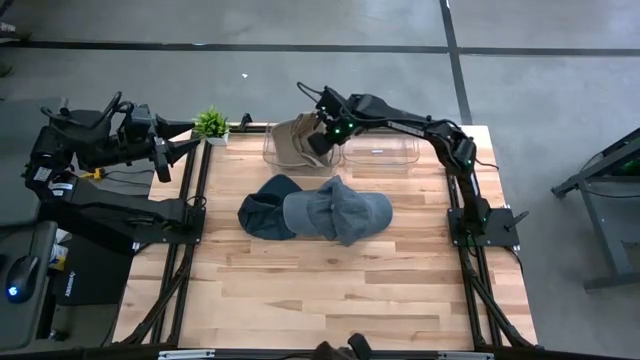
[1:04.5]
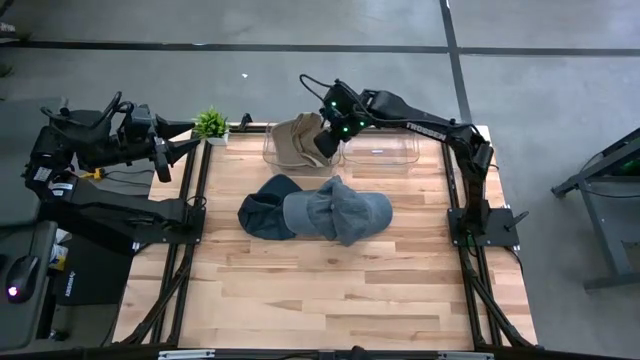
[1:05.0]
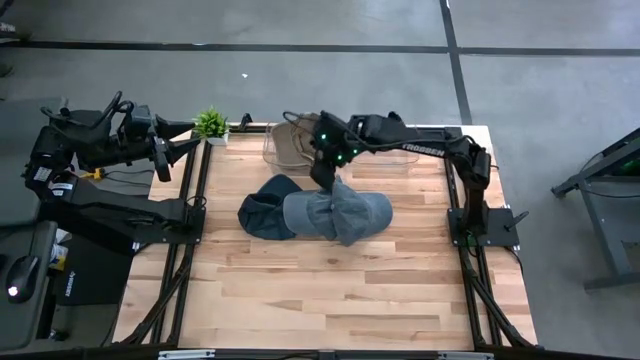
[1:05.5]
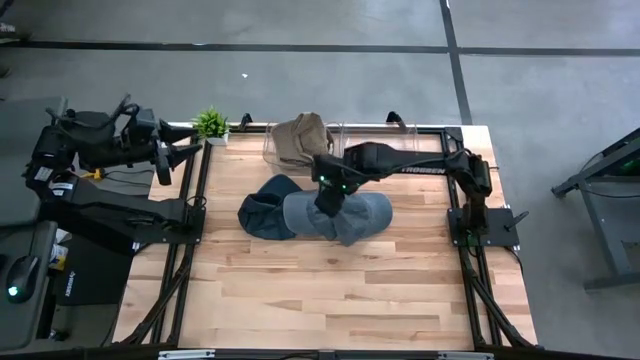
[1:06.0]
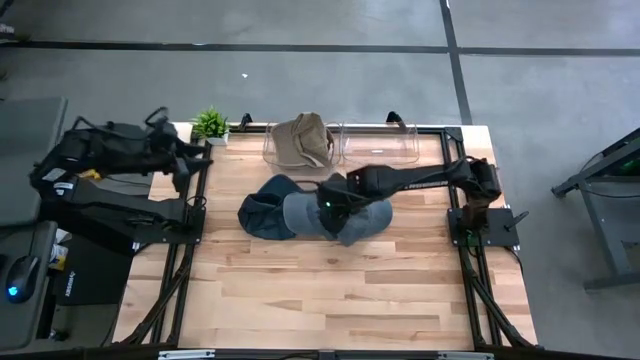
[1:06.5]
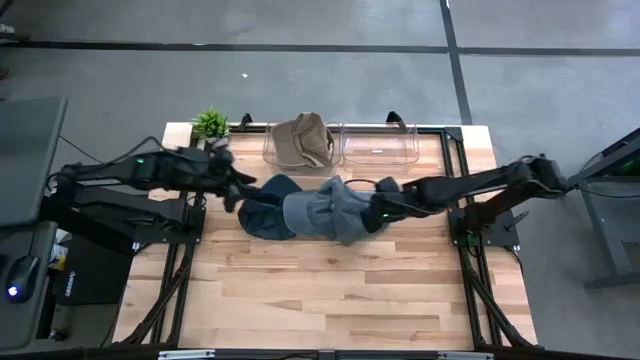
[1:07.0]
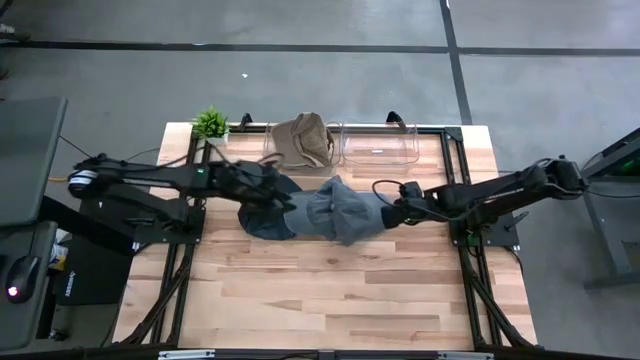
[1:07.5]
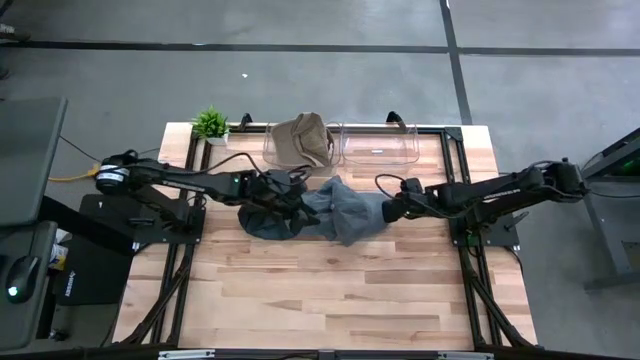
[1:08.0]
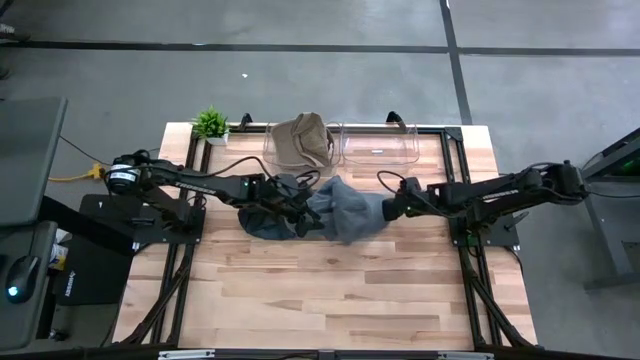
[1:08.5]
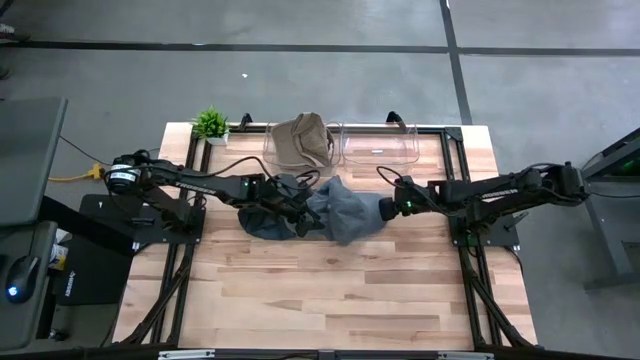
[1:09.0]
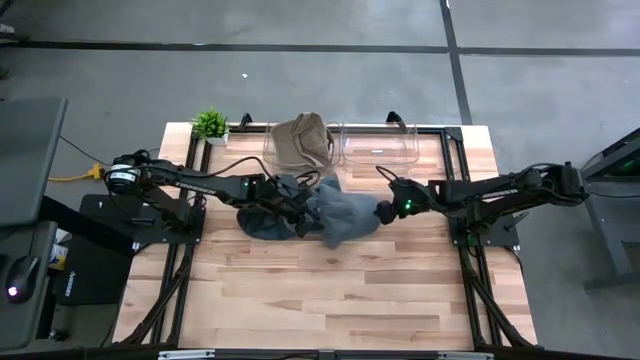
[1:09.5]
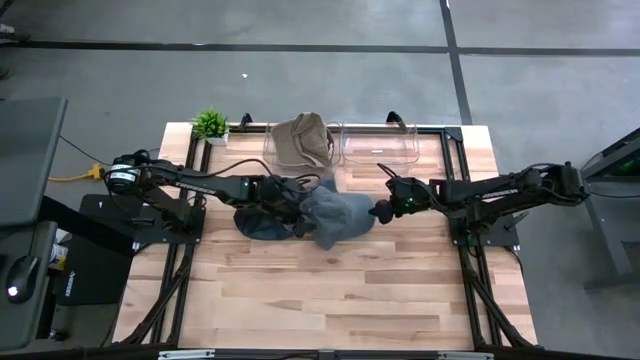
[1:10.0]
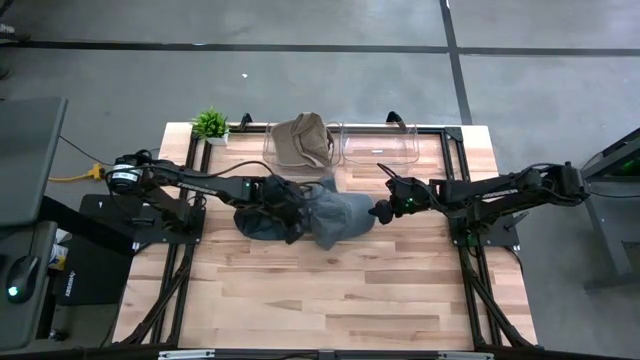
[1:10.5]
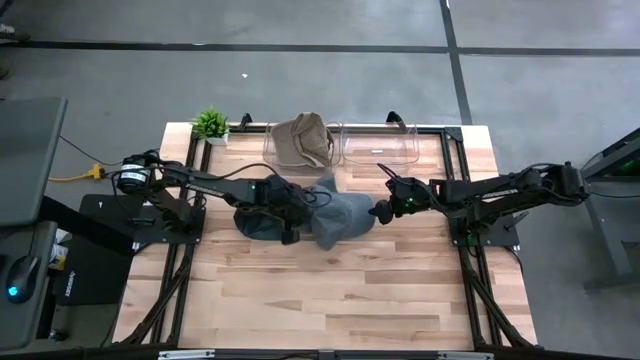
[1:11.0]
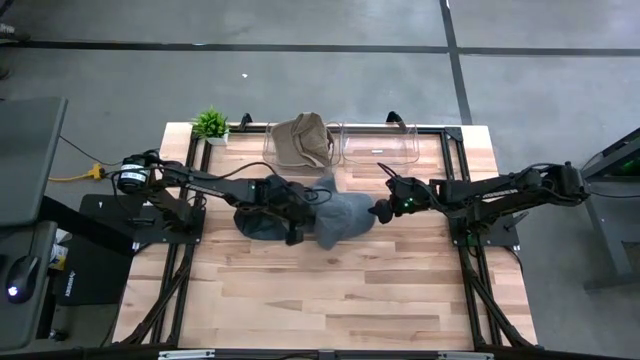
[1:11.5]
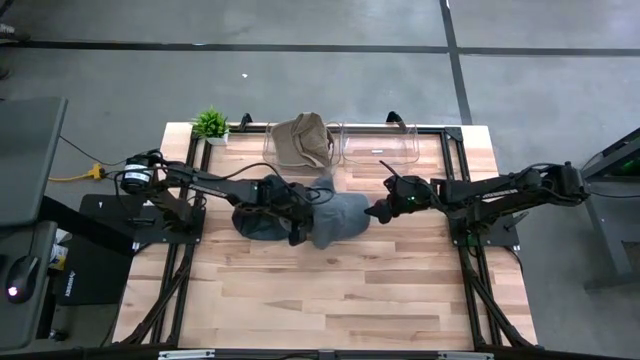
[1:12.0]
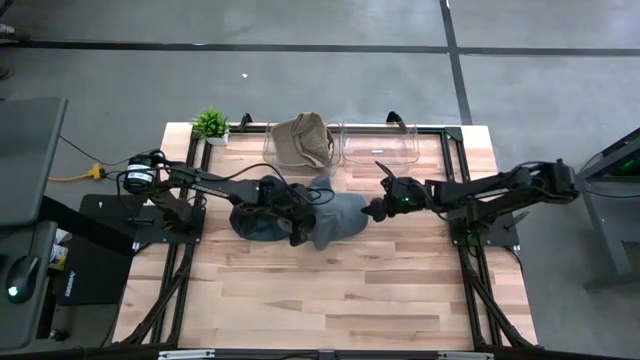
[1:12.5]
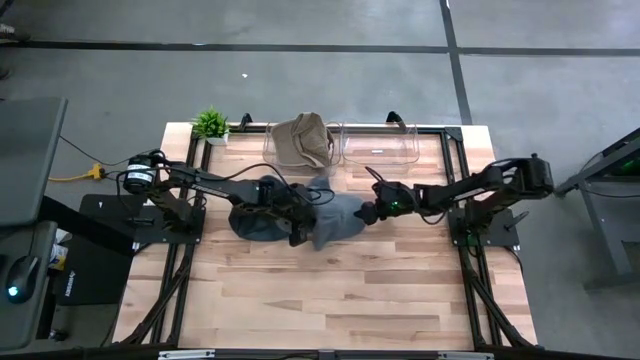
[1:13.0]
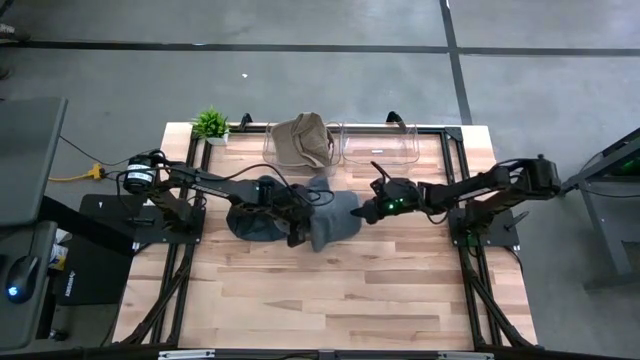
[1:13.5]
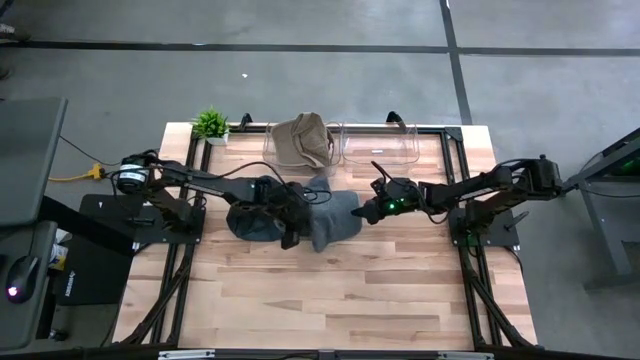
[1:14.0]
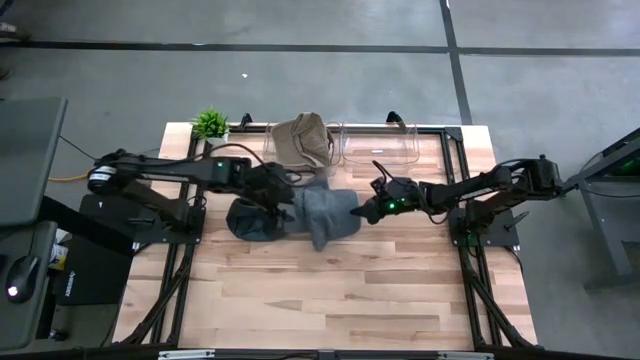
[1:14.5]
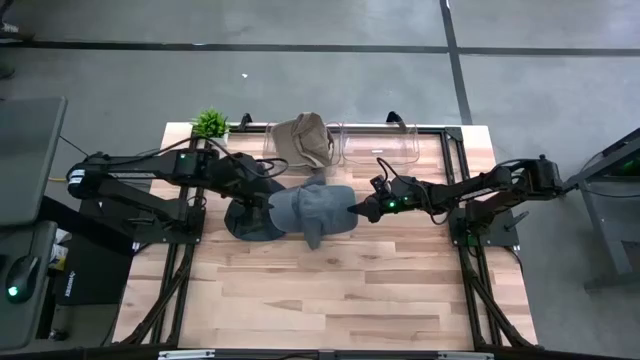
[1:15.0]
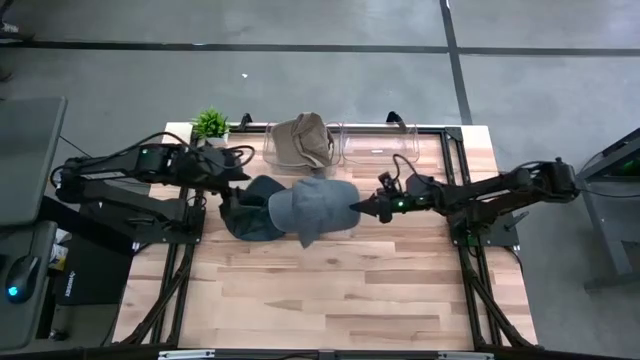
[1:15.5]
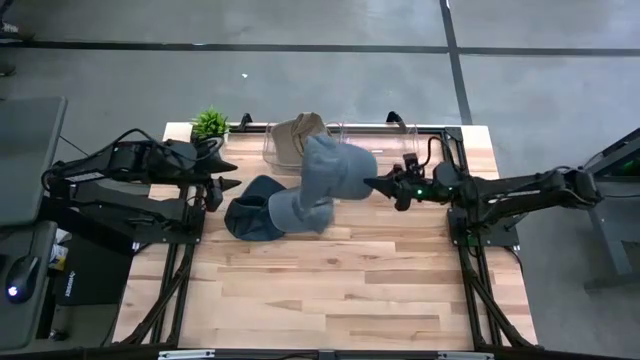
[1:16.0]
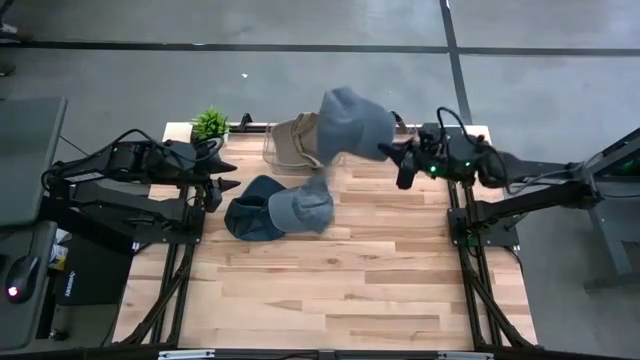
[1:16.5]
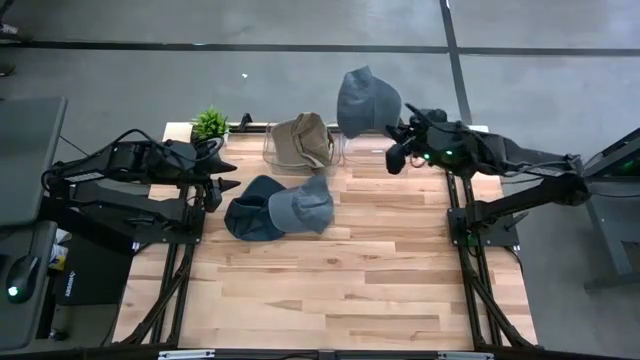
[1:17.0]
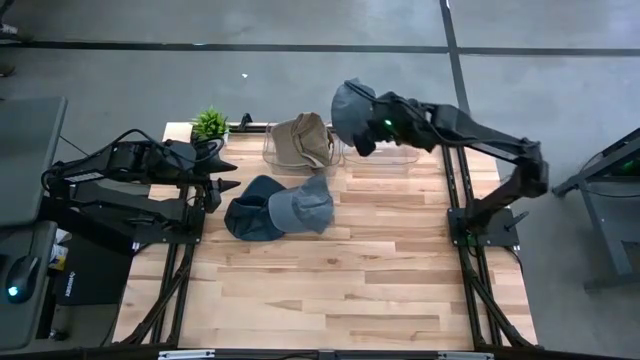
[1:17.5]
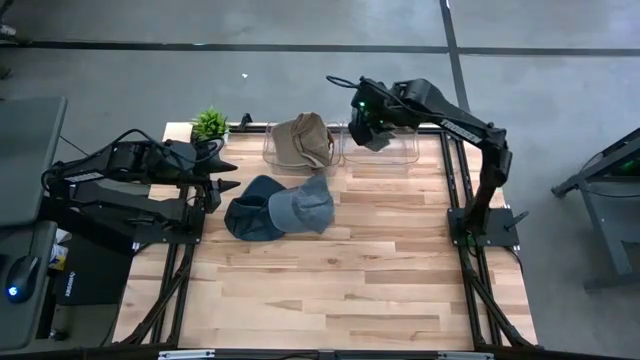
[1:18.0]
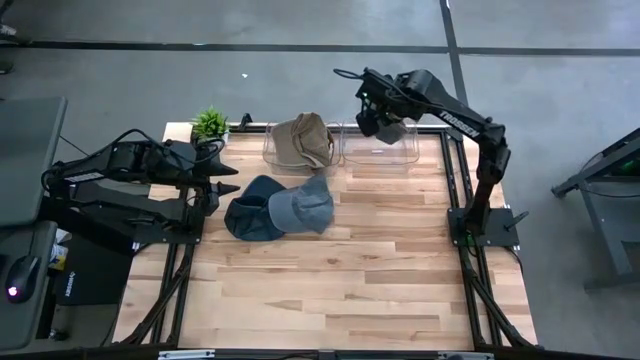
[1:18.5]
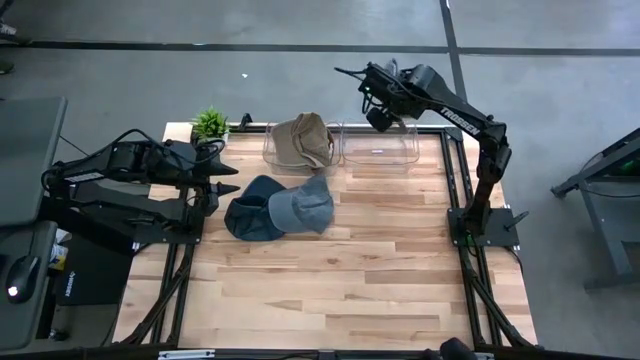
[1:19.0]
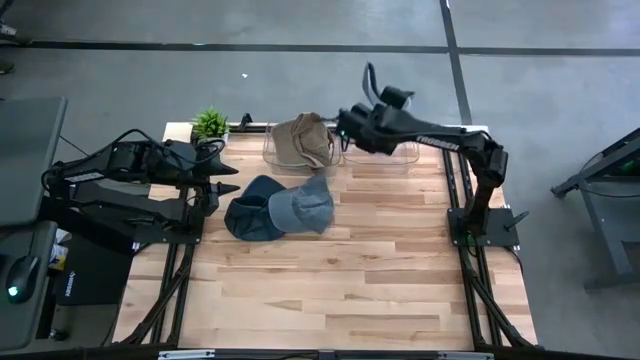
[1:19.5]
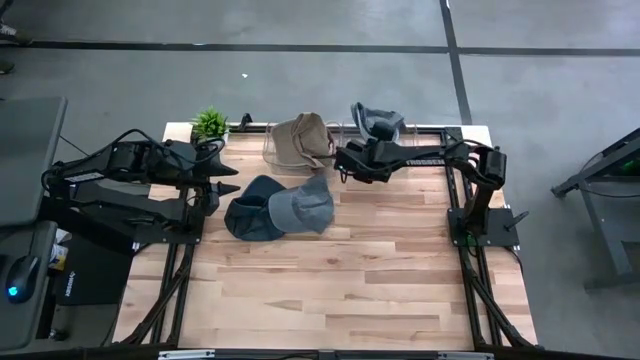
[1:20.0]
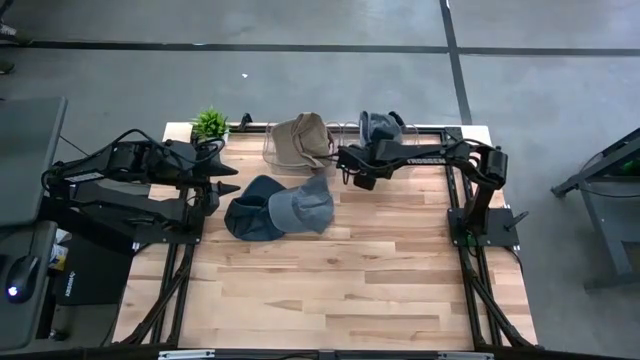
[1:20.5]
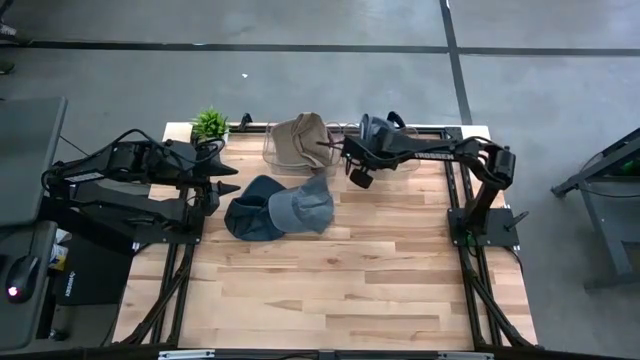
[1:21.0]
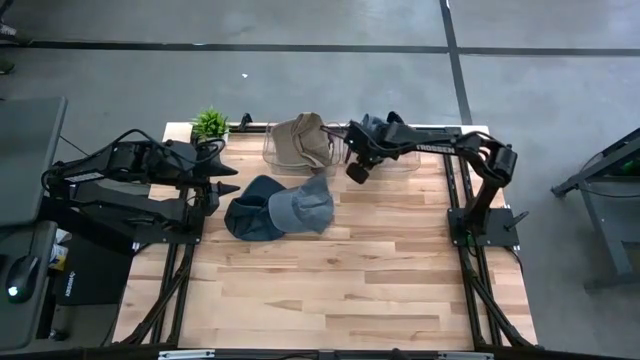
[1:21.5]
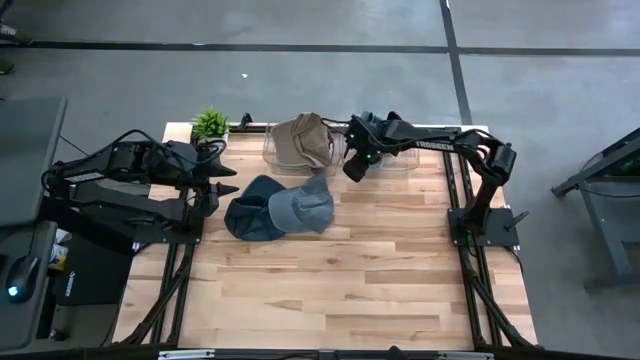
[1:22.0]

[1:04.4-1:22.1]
Task: Pick & Place hat
Put the top gray cap into the right transparent bin

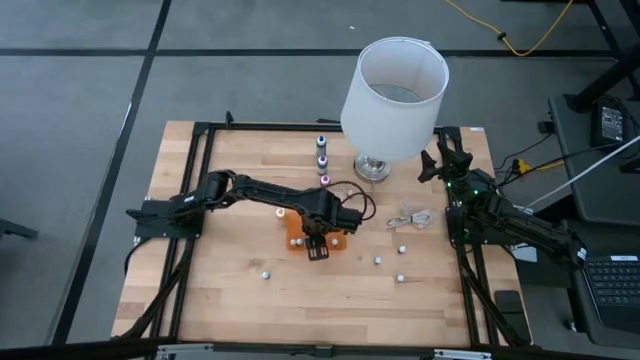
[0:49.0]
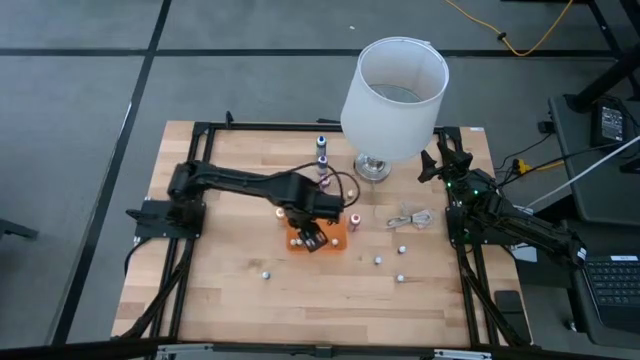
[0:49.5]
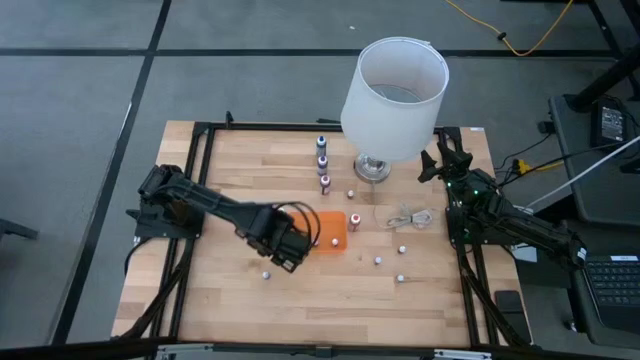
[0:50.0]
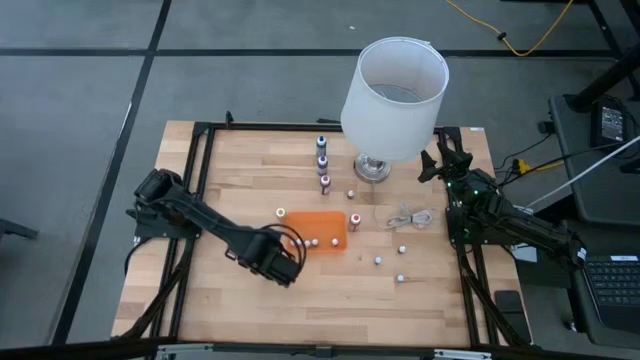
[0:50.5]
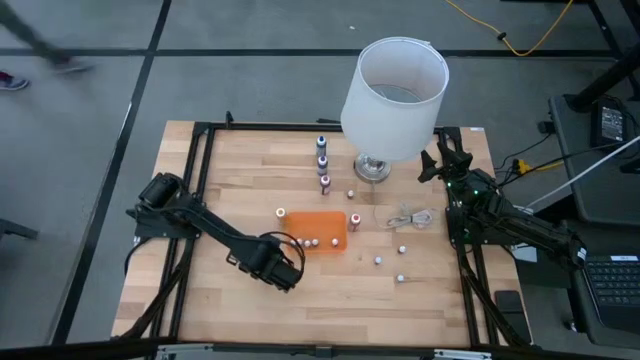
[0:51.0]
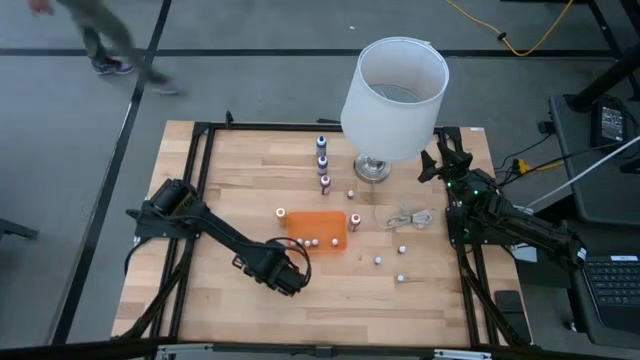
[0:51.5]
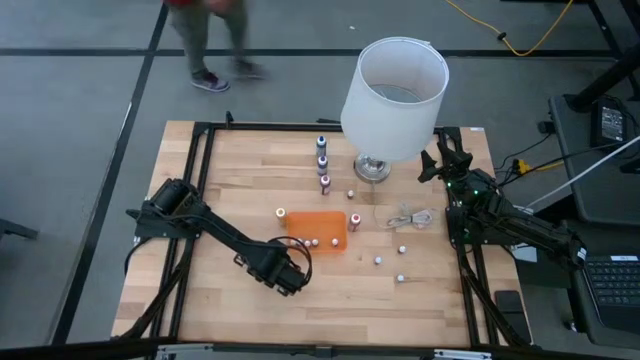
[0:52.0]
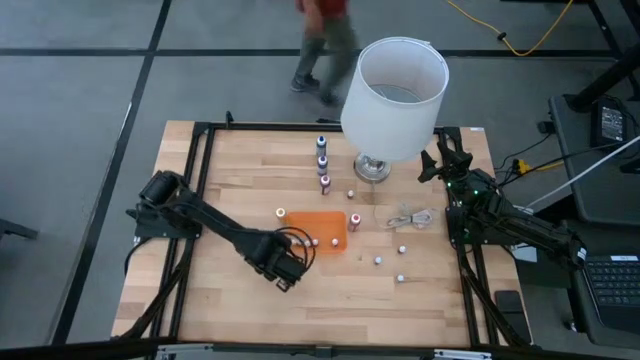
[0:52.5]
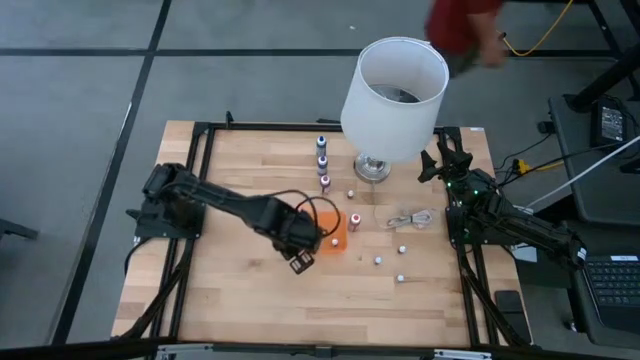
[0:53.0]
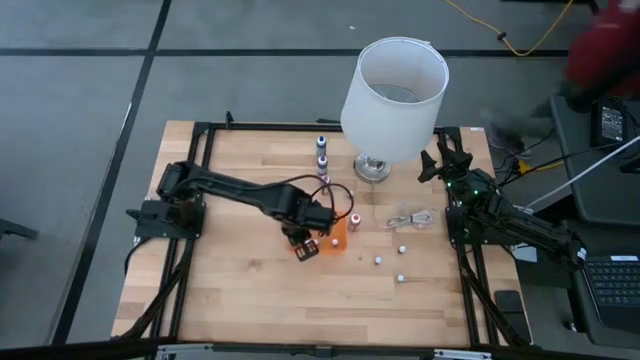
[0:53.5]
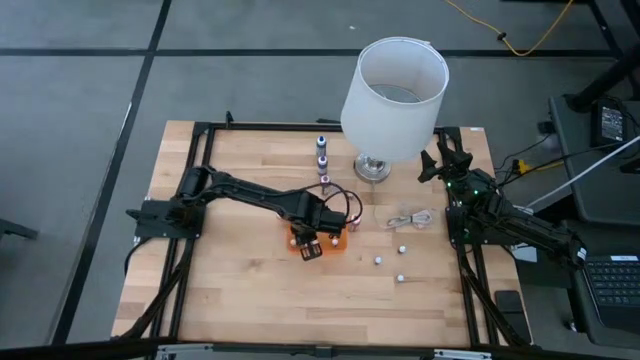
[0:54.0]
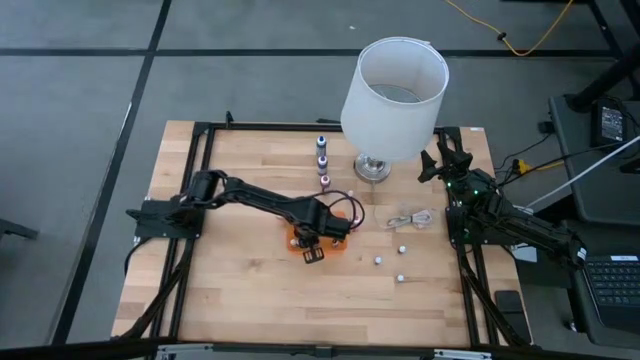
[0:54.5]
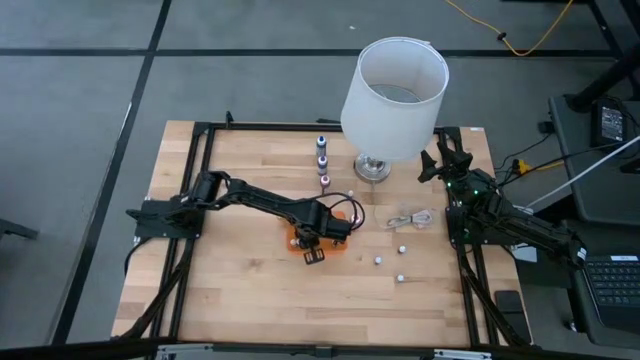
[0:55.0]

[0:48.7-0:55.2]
Task: Pick & Place food coloring
Put the small blue food coloring bottle into the orange bin
